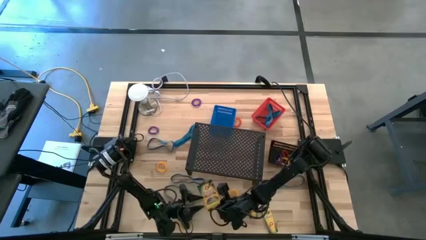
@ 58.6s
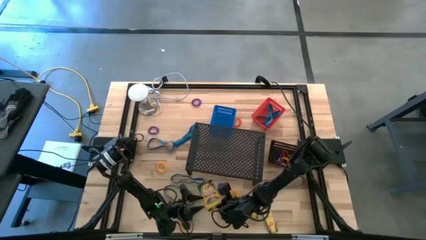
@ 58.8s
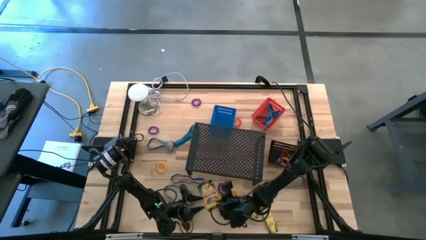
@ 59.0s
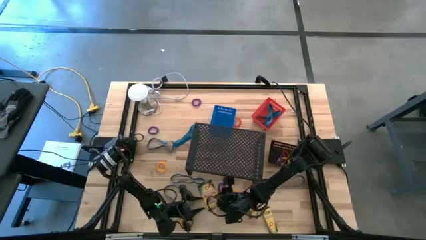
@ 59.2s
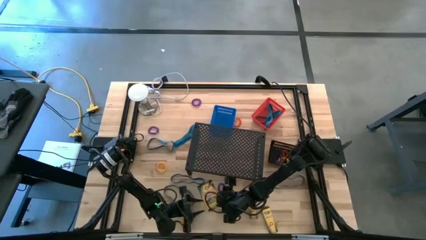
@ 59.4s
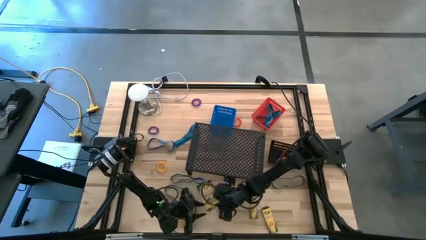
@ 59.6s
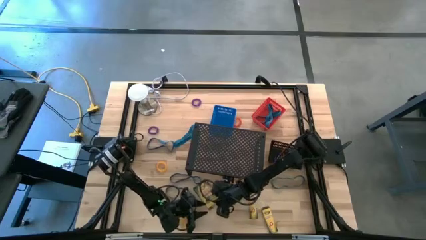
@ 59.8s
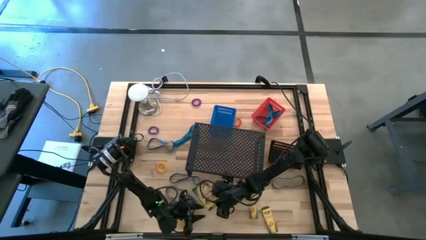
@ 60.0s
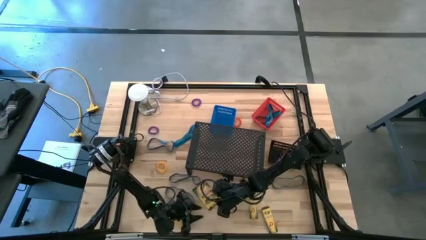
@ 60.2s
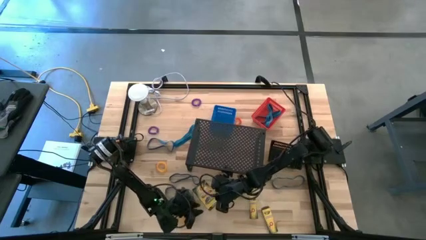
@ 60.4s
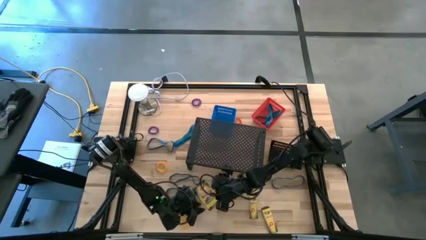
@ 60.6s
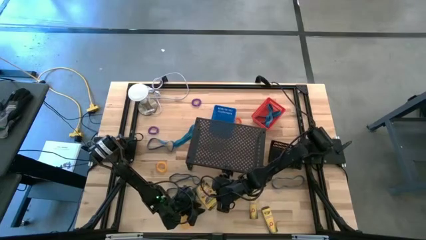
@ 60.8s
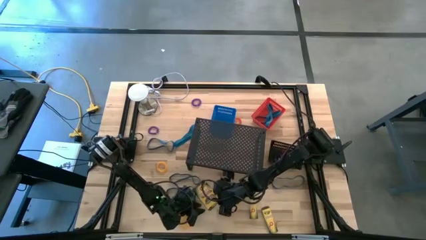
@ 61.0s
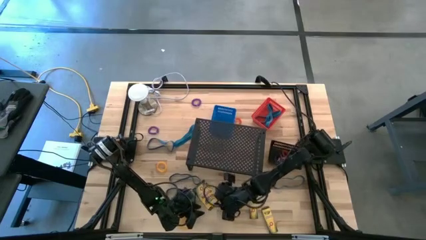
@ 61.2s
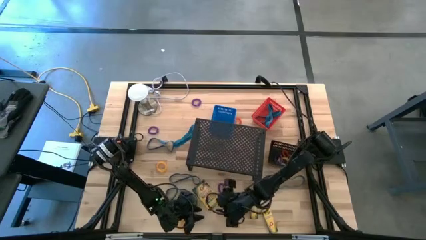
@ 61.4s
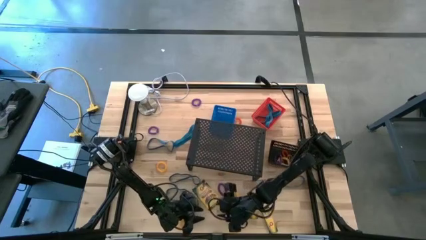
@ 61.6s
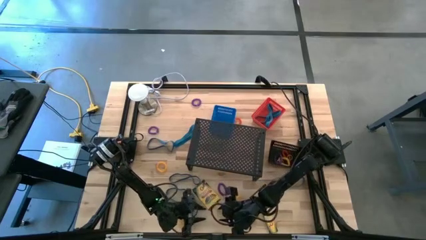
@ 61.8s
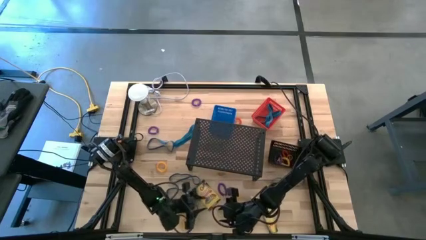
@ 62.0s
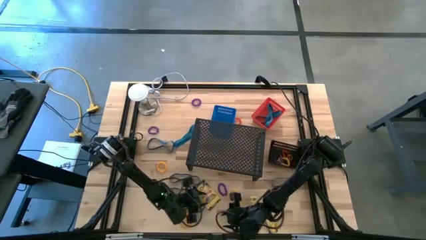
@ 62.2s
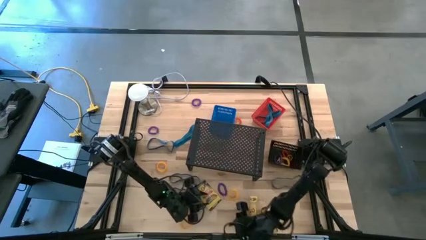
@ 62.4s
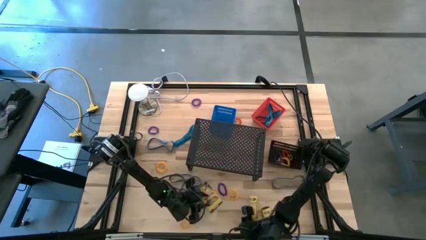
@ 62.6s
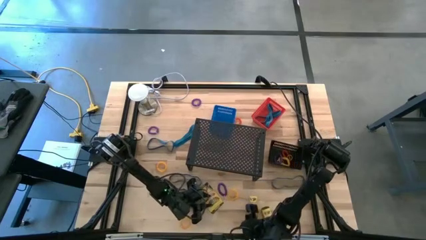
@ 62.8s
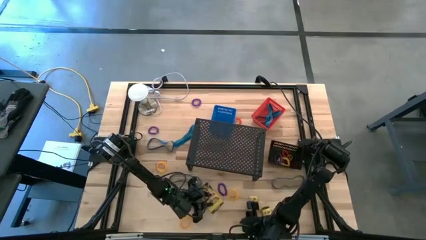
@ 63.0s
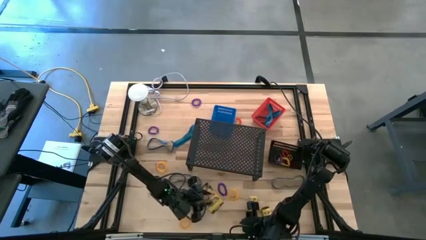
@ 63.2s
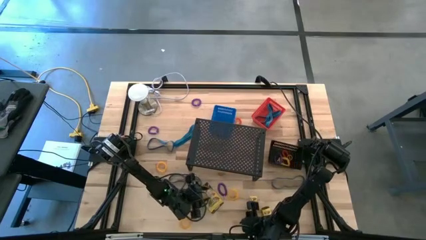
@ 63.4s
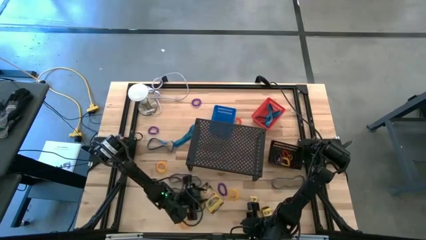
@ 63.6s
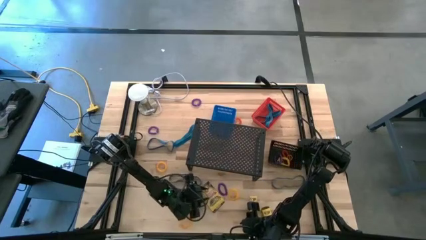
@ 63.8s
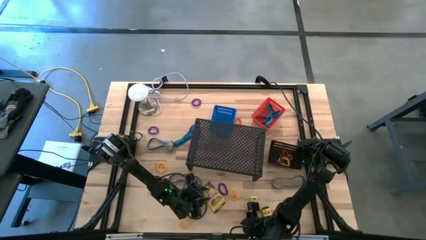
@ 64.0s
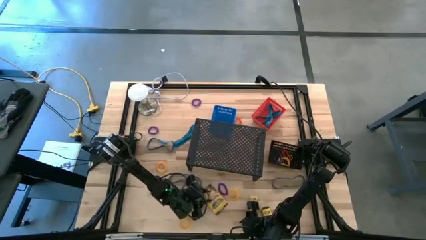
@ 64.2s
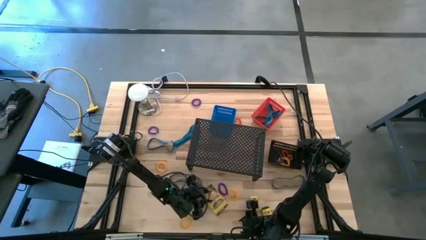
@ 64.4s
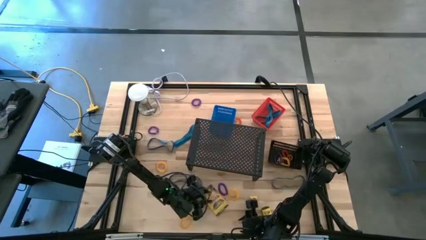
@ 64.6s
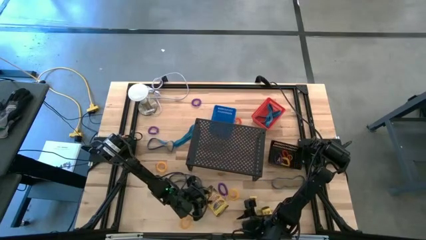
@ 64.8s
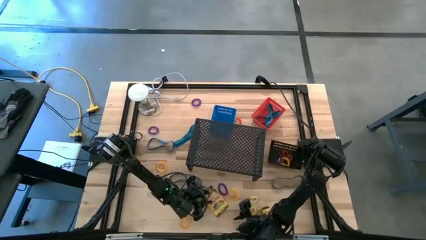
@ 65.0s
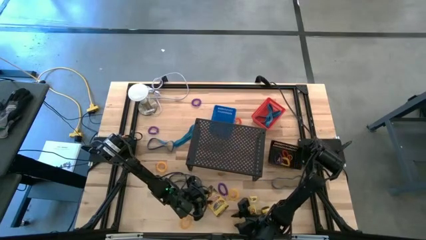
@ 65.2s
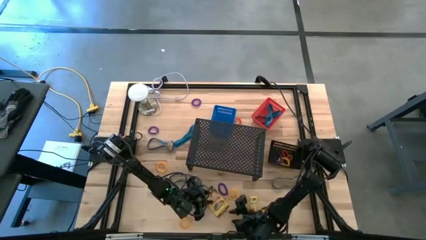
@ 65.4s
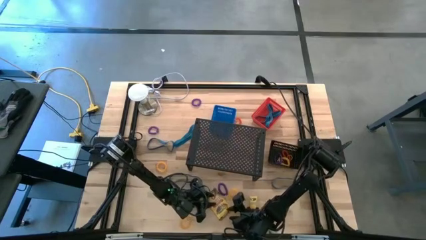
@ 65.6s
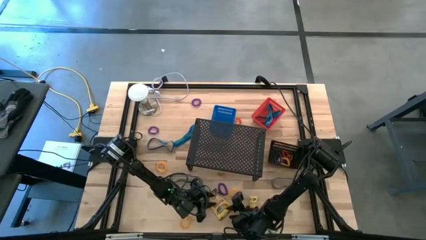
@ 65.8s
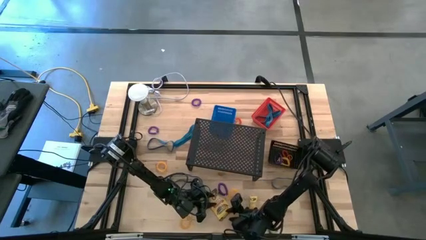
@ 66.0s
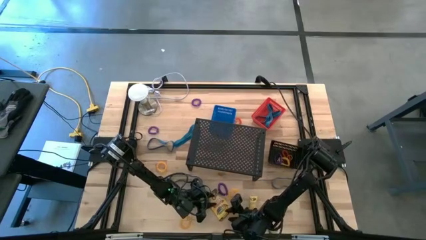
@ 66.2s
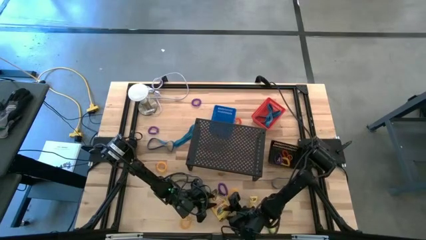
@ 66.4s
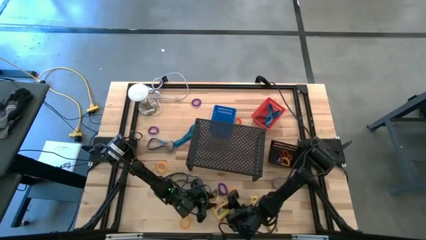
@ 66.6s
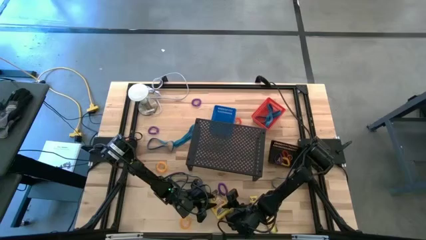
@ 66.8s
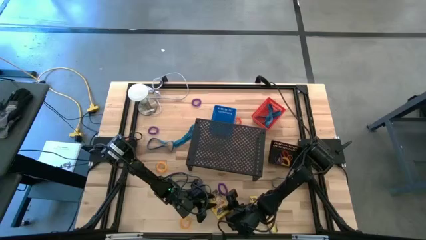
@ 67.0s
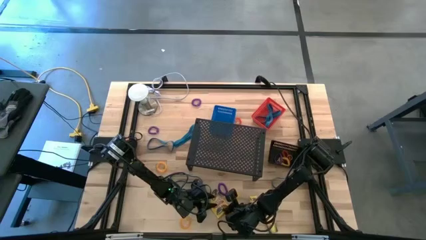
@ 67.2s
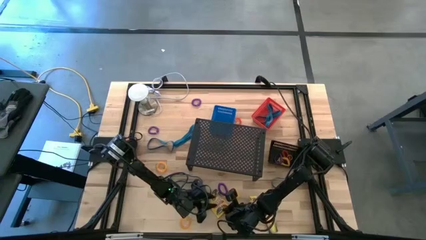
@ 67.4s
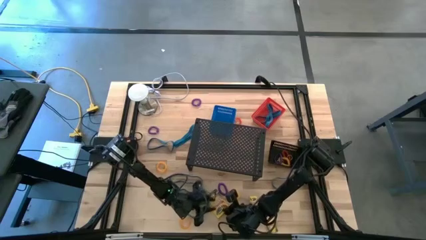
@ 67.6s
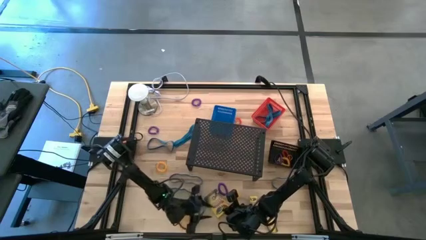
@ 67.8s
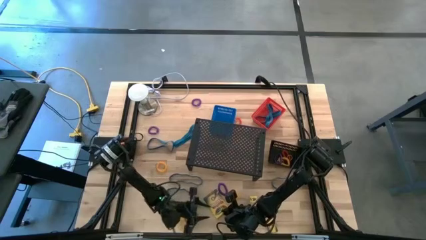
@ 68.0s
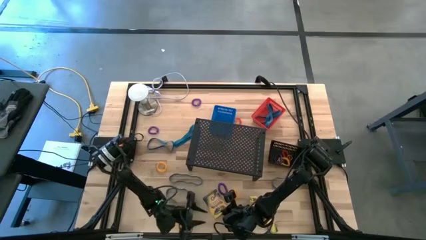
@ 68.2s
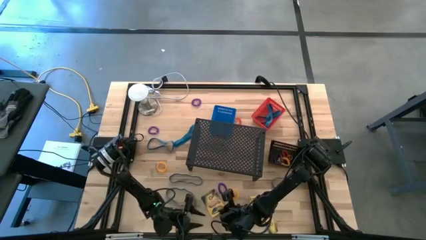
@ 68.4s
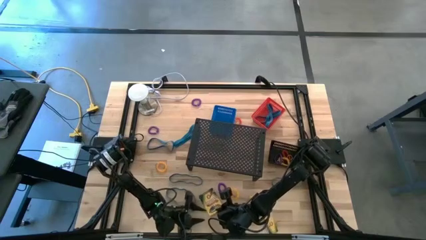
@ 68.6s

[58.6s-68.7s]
Task: Pick & Place Office Desk Supplies
Put the yellow crayon box into the blue bin

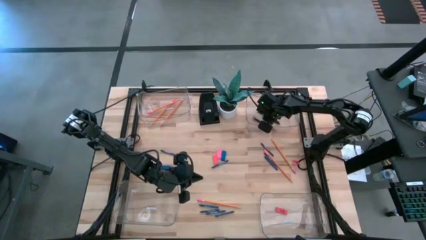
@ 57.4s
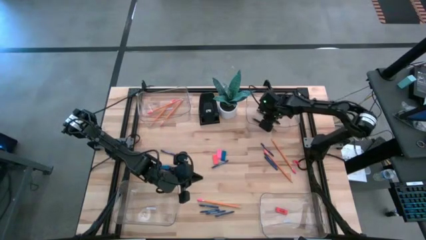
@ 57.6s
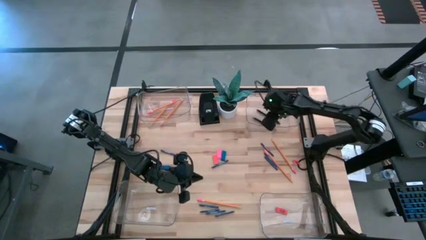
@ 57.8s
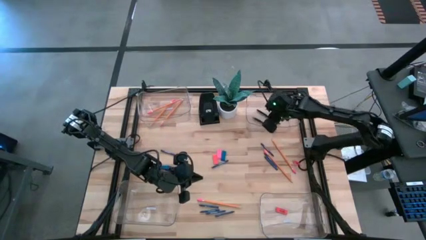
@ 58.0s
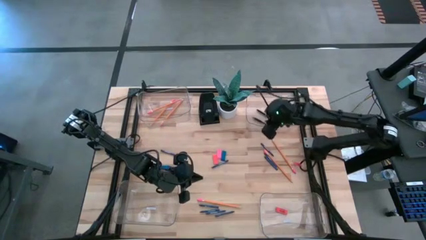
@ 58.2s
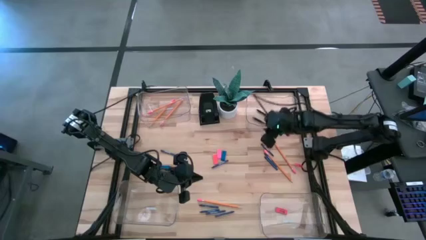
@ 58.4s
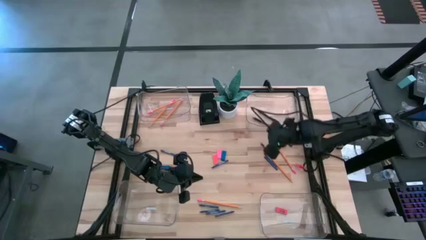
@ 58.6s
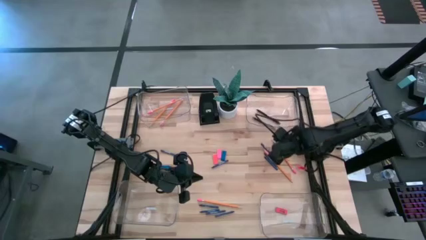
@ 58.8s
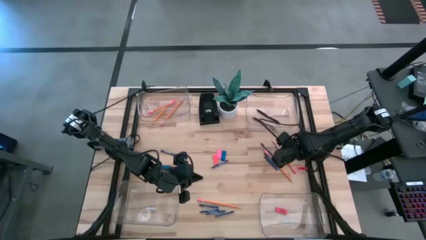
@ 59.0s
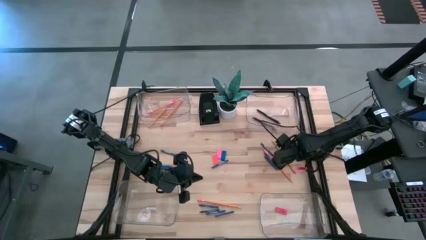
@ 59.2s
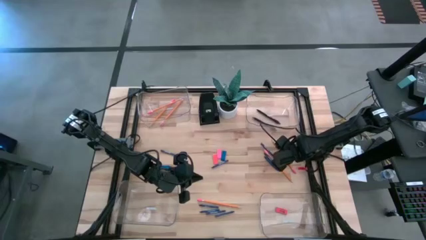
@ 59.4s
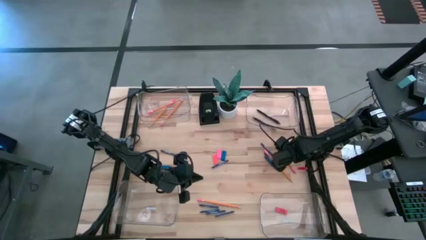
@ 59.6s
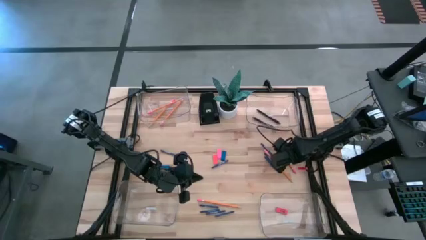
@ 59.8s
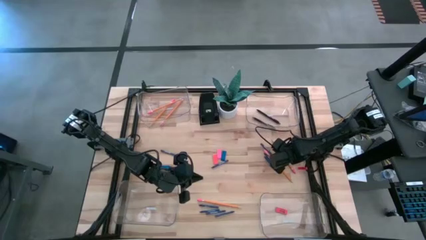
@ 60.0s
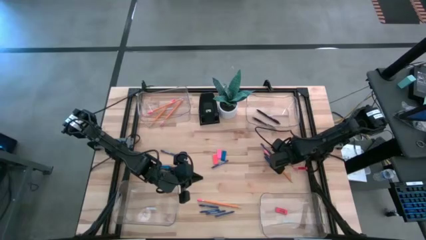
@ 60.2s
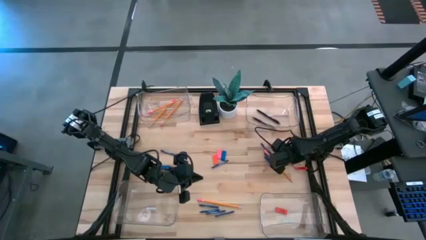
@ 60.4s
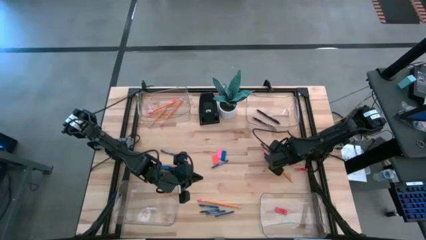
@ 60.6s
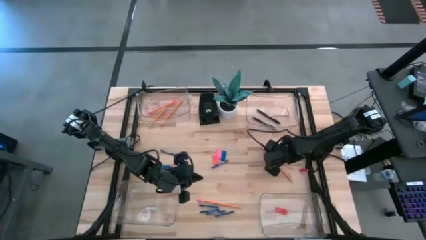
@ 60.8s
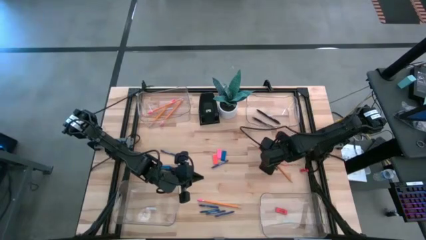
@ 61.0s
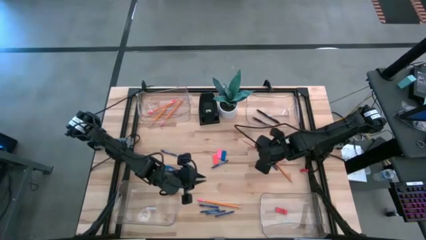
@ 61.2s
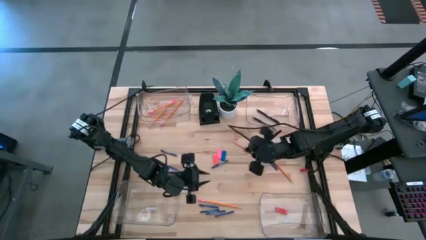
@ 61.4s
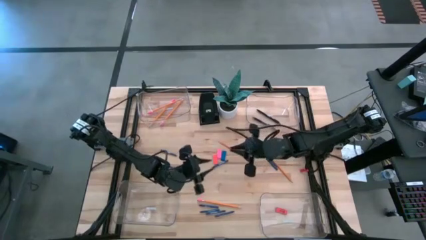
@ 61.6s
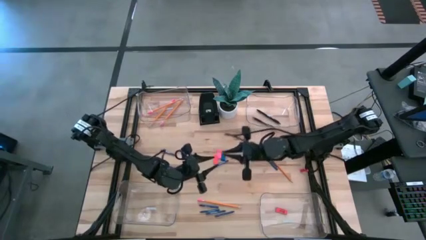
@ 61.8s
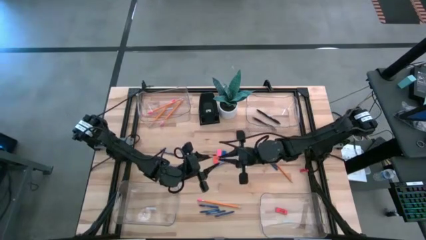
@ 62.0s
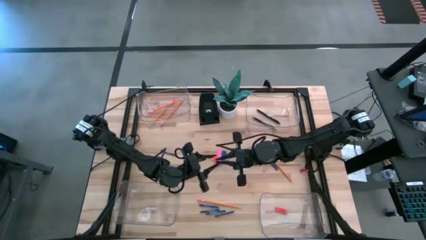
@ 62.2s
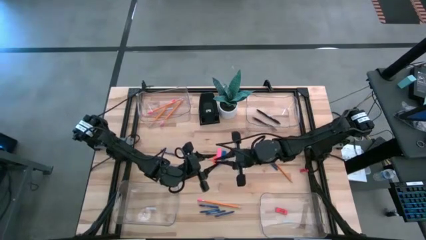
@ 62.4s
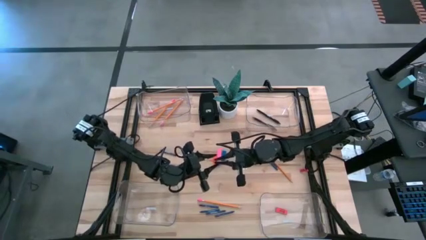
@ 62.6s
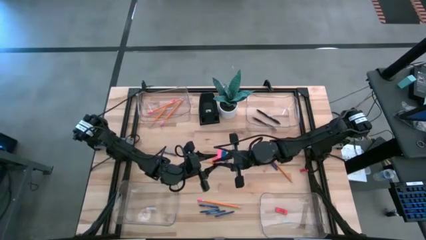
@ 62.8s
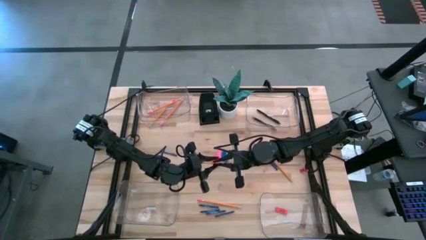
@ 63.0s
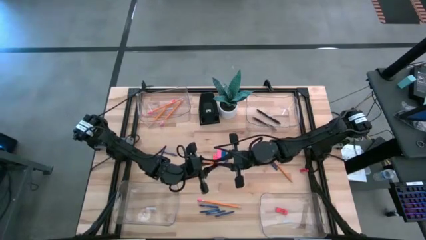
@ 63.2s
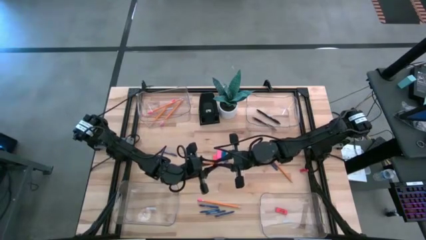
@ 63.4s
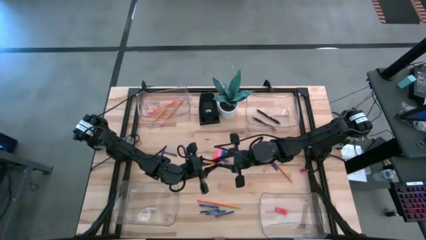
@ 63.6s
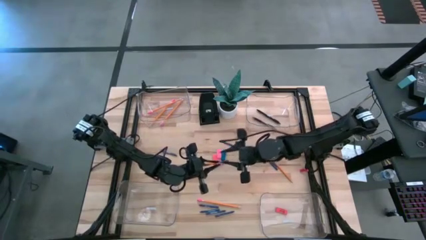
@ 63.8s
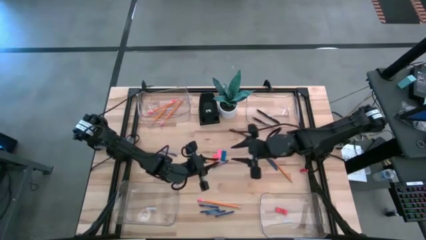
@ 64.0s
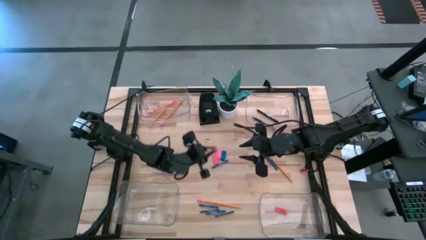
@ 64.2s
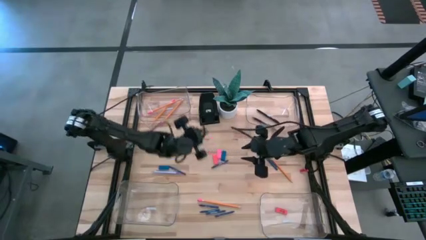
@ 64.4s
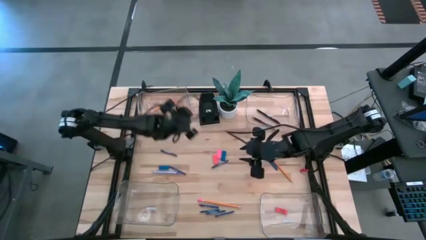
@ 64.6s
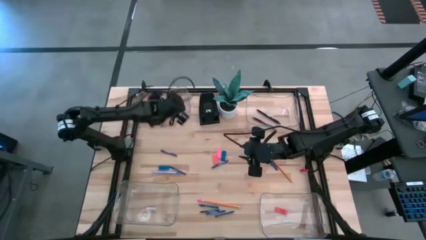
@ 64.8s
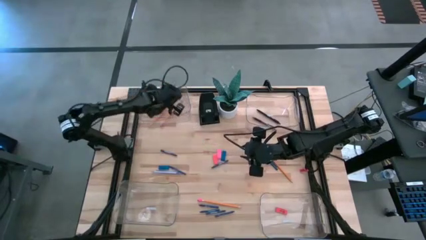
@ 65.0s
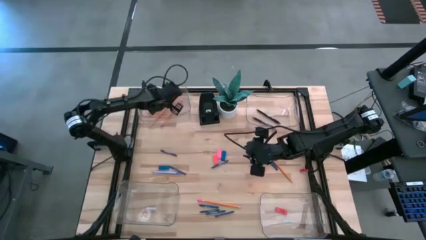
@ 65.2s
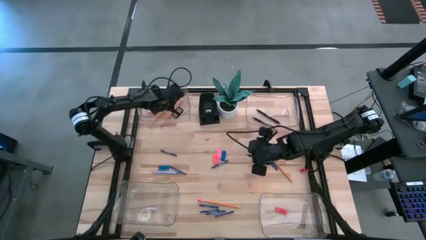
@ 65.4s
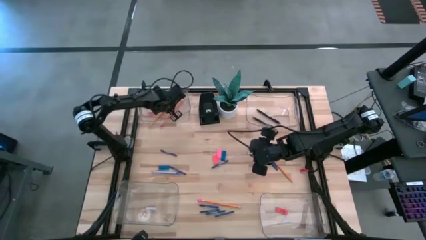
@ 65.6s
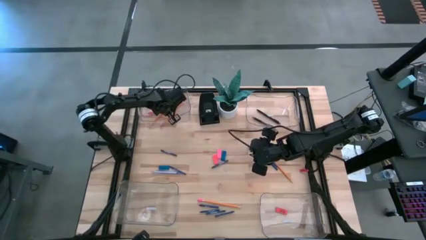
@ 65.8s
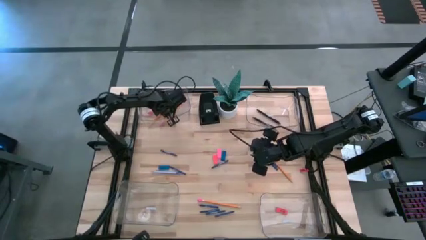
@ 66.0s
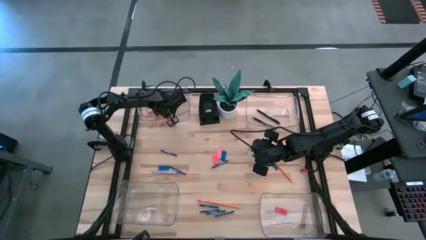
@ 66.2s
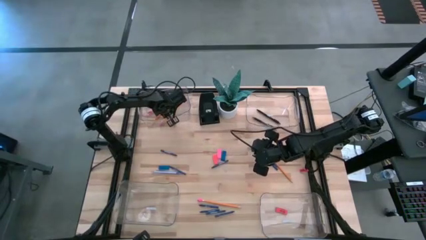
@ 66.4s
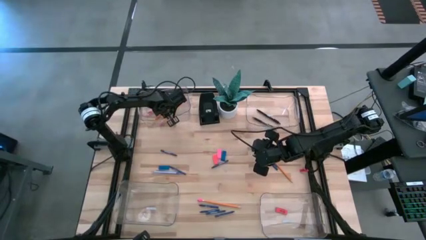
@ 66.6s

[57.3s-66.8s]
Task: Sort crayons/erasers/pens/pencils in bins
Put the orange pencil into the top left transparent bin
